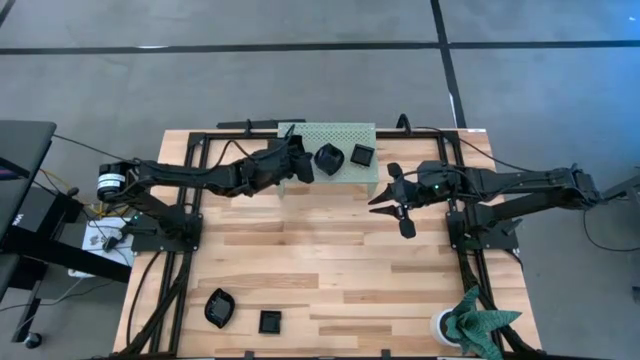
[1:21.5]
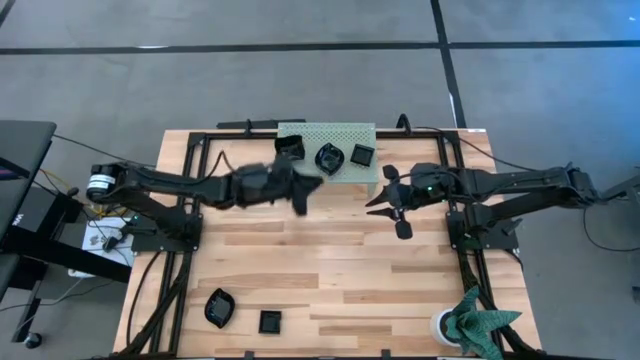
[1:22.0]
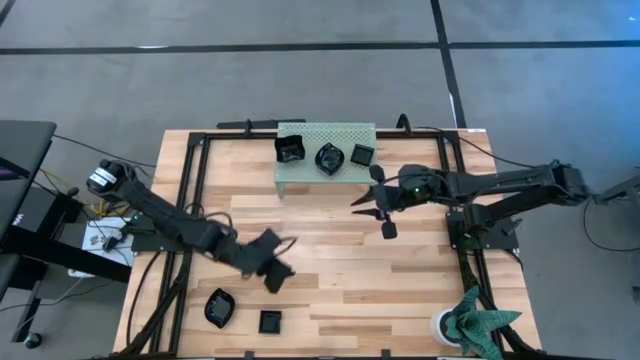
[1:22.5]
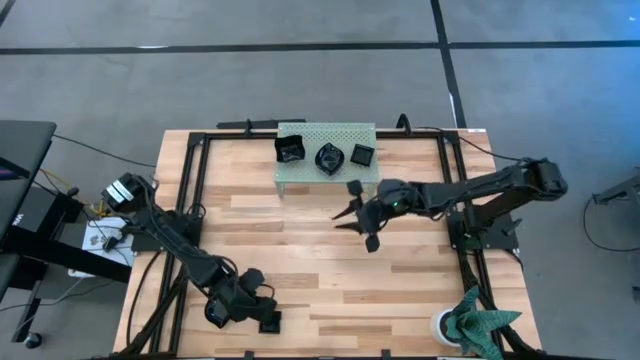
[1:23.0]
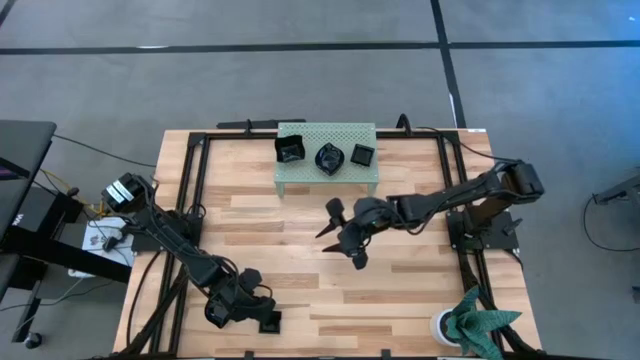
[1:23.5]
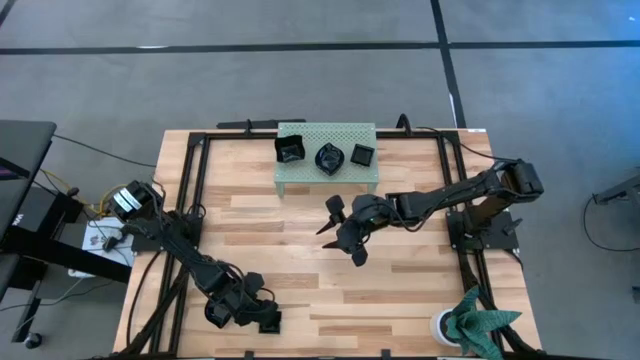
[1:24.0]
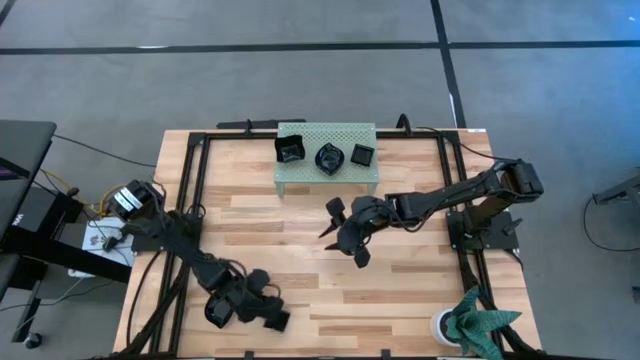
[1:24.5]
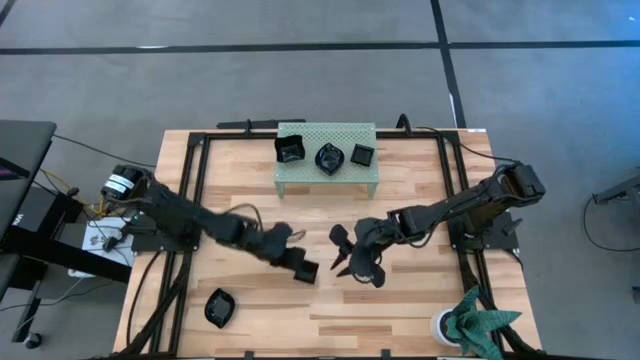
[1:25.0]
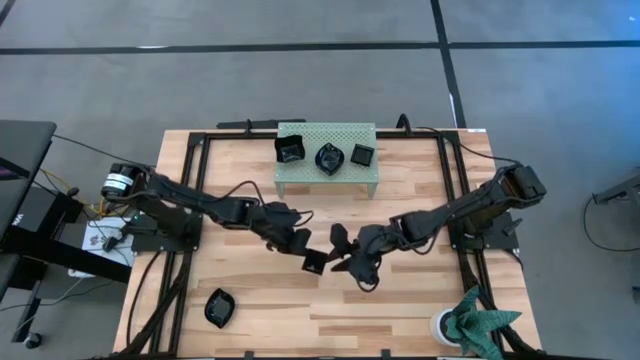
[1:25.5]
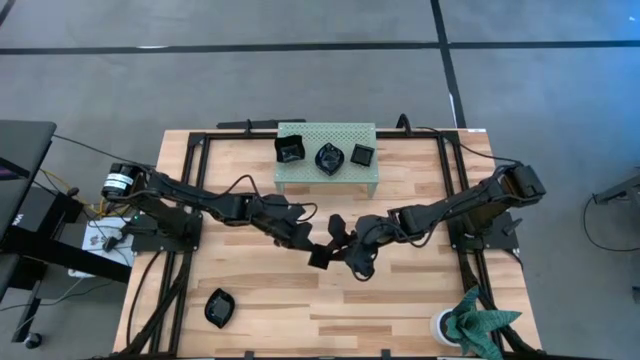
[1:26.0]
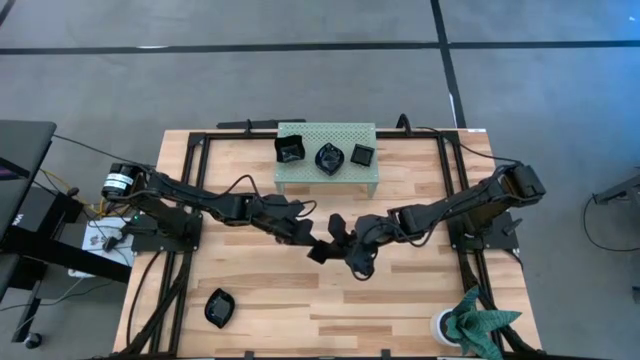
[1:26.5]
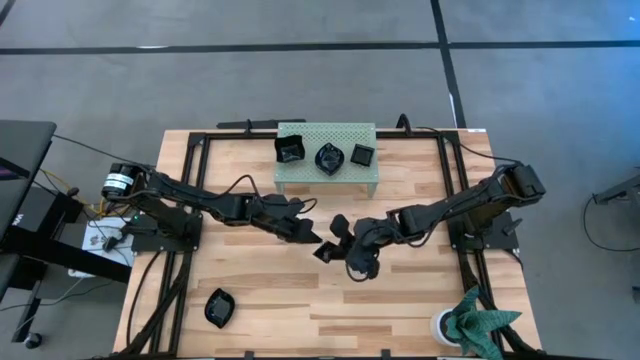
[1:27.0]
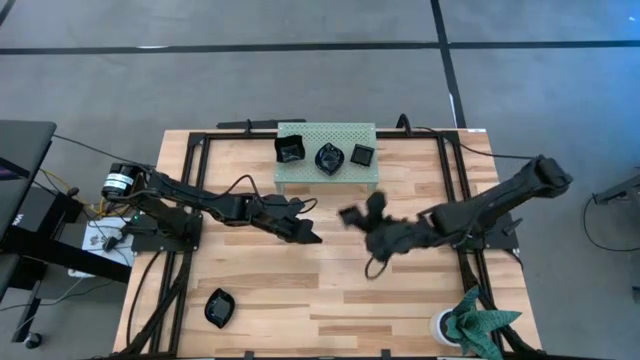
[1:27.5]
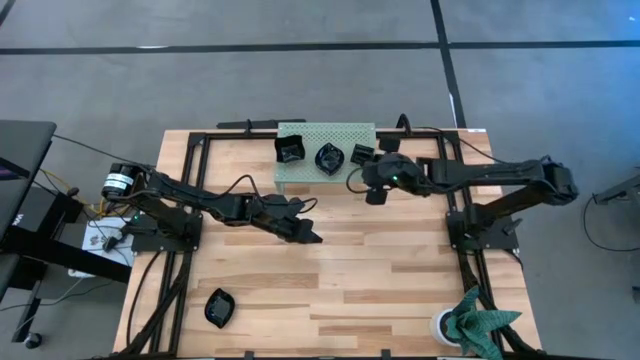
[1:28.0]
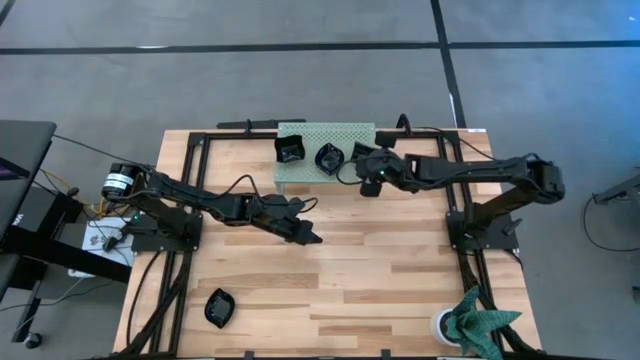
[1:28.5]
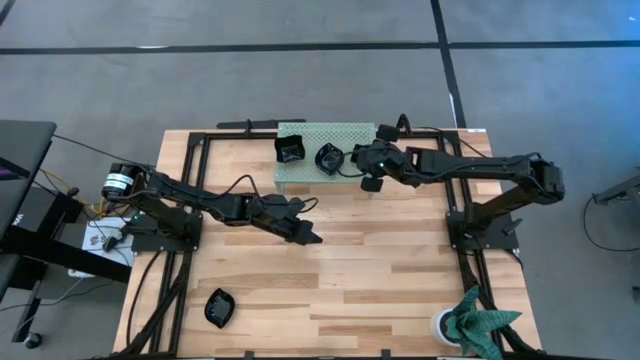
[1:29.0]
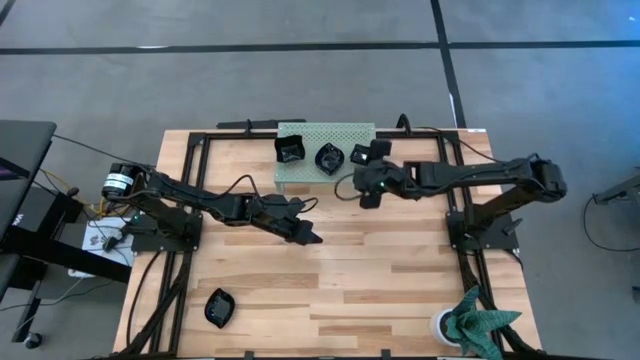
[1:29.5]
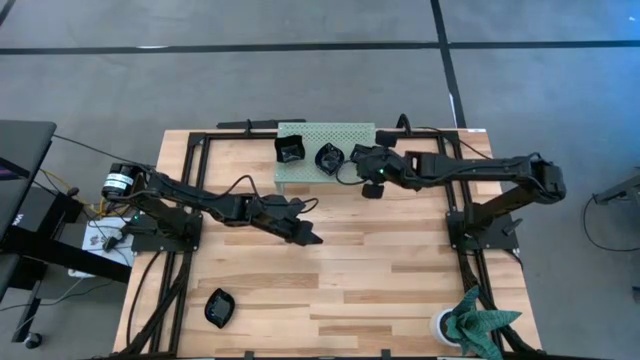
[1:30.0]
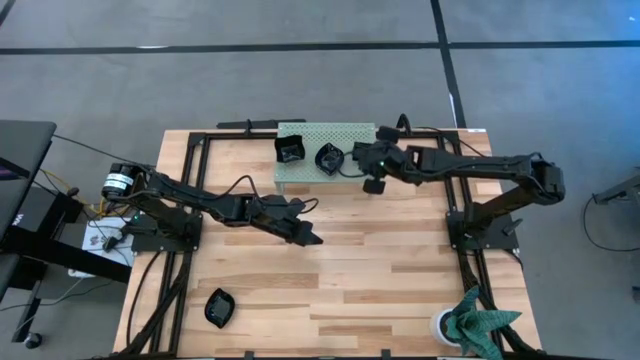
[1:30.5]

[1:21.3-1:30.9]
Task: Pick & Place Mini shaped plates
Stack the square plate on the square plate on the shelf

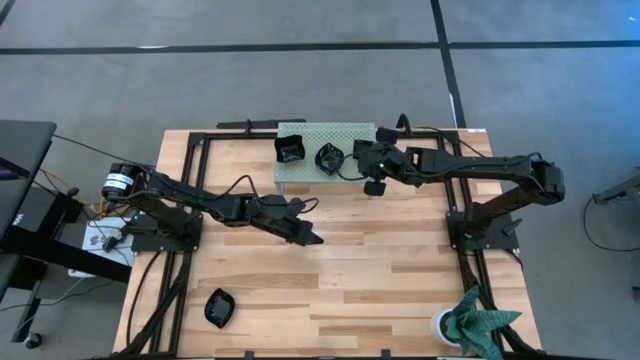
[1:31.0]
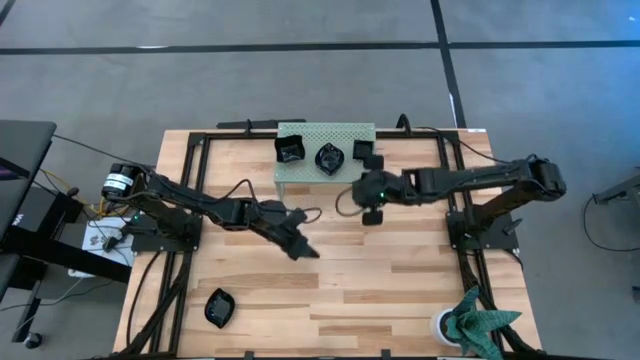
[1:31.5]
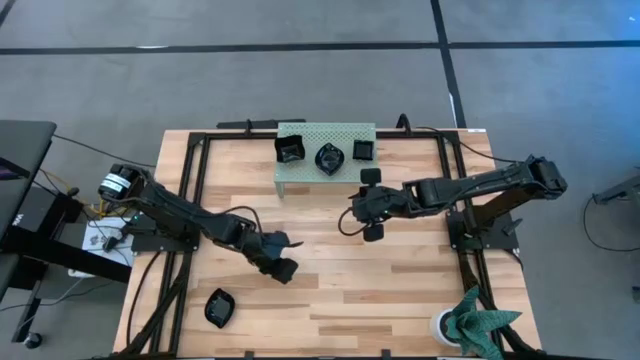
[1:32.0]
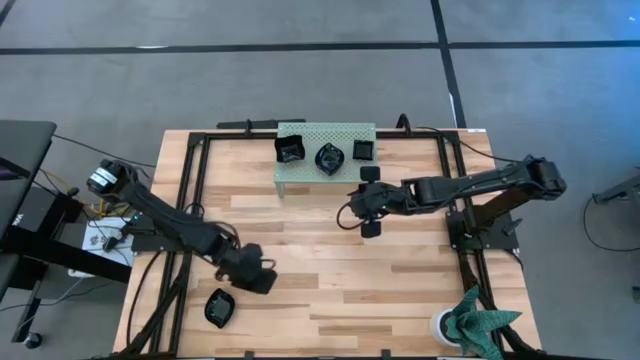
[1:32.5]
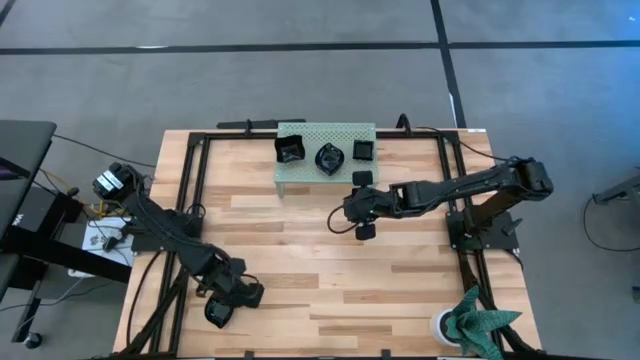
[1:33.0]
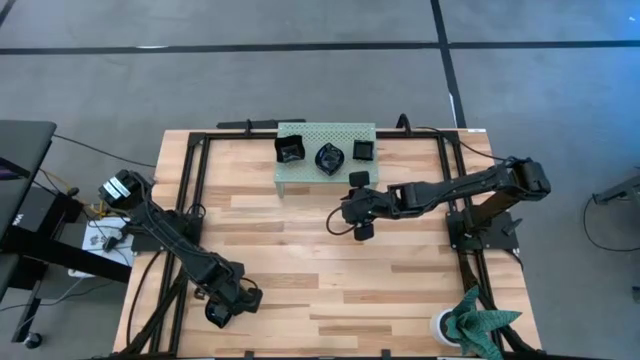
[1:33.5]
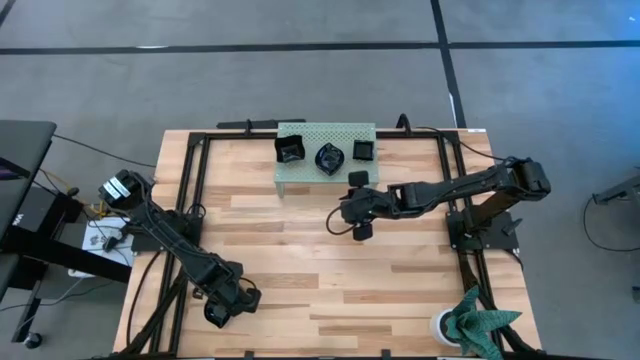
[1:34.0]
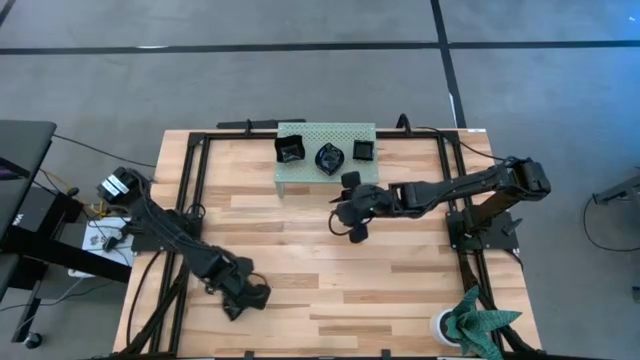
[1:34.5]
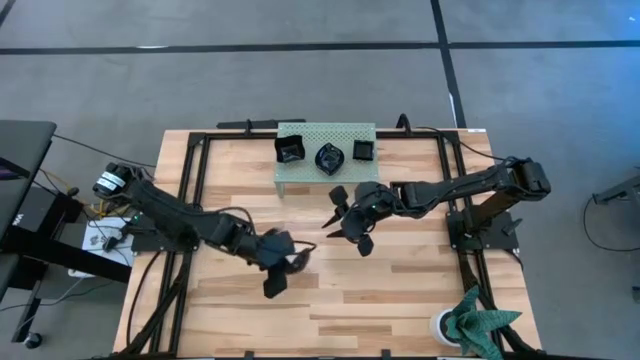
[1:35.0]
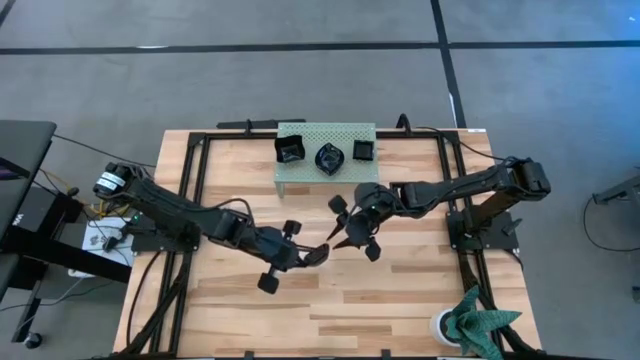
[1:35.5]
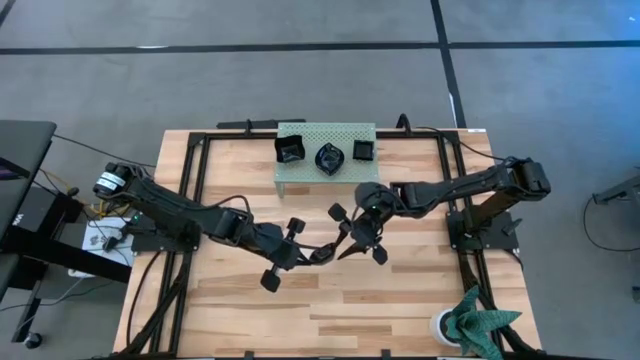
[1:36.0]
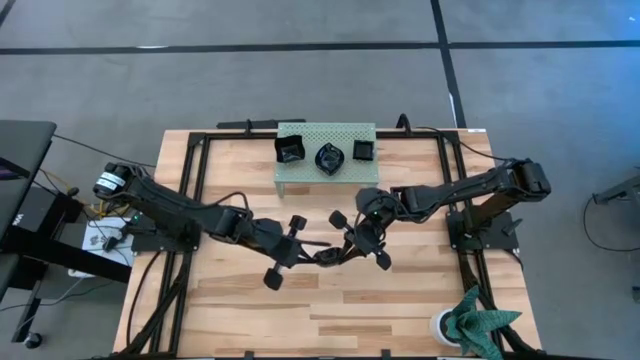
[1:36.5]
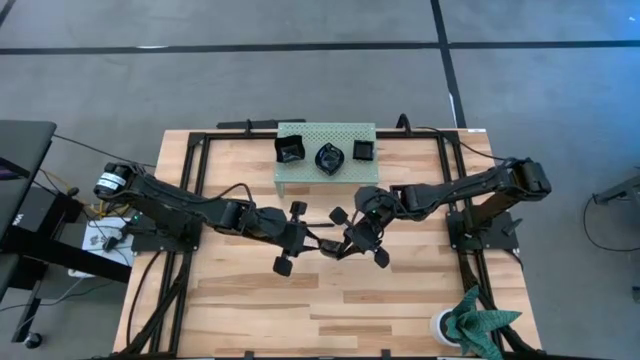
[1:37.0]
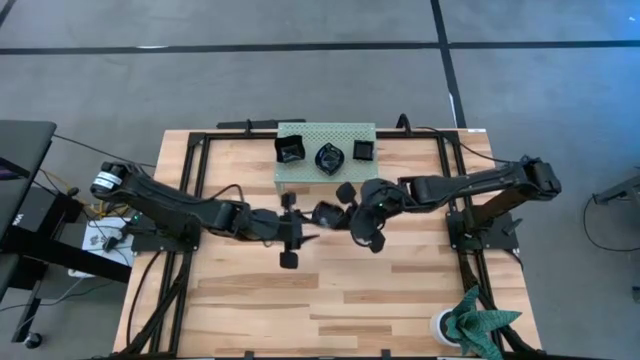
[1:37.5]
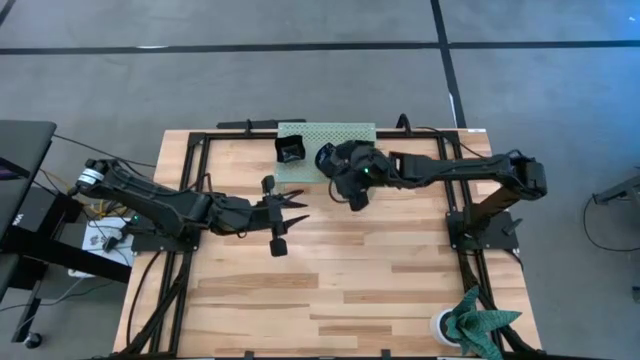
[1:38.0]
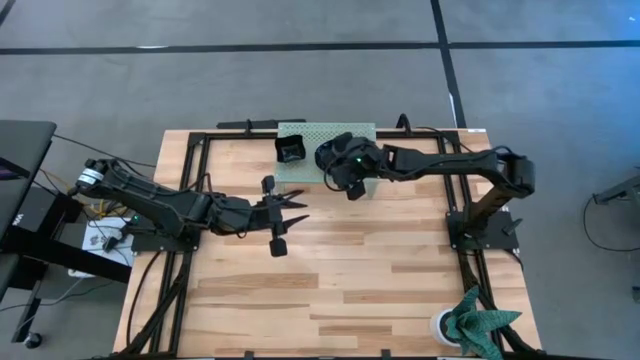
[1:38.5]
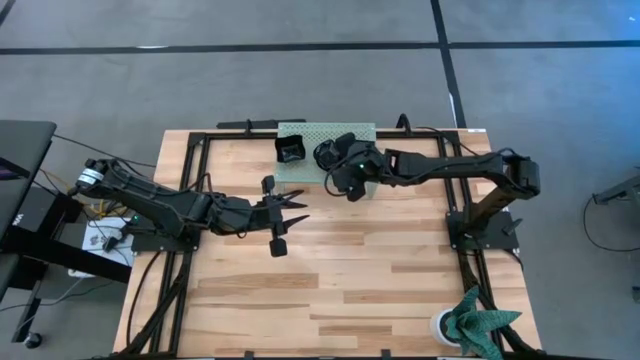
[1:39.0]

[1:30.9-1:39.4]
Stack the leaf-shaped plate on the leaf-shaped plate on the shelf

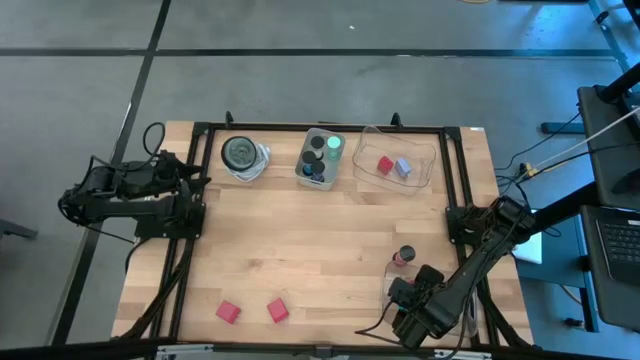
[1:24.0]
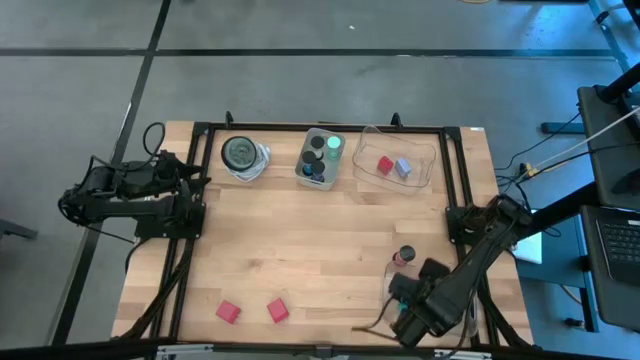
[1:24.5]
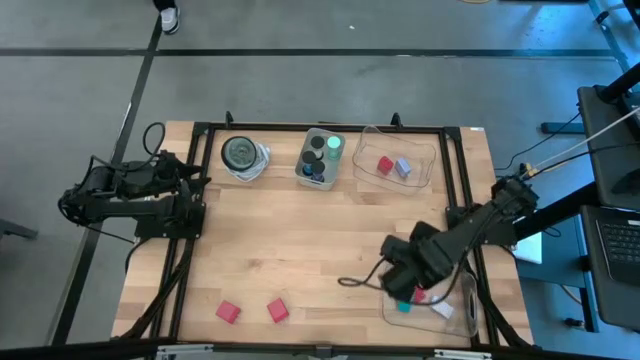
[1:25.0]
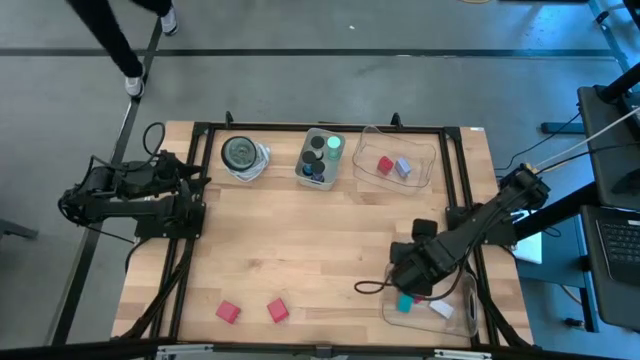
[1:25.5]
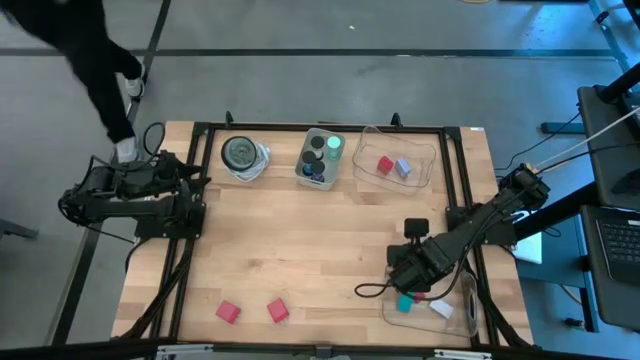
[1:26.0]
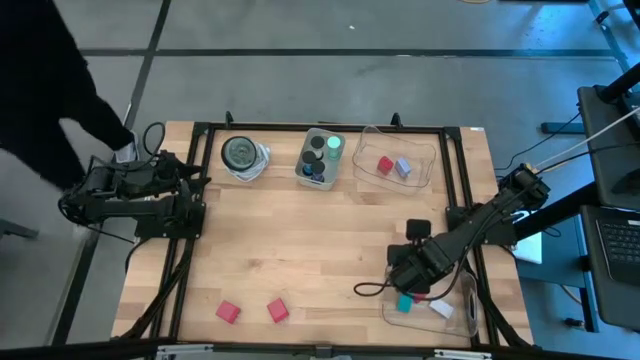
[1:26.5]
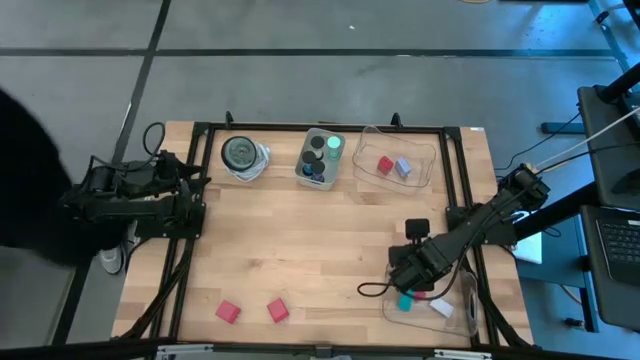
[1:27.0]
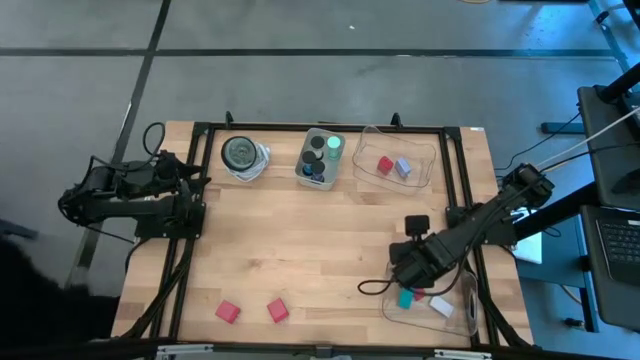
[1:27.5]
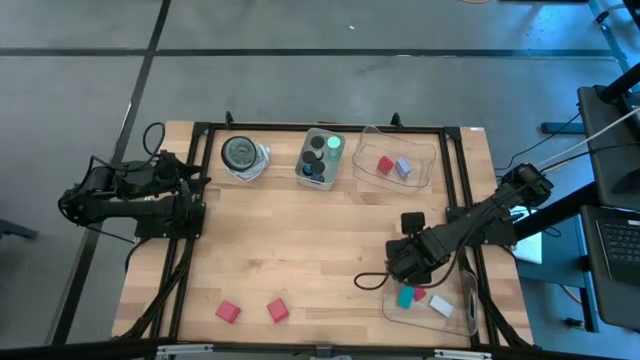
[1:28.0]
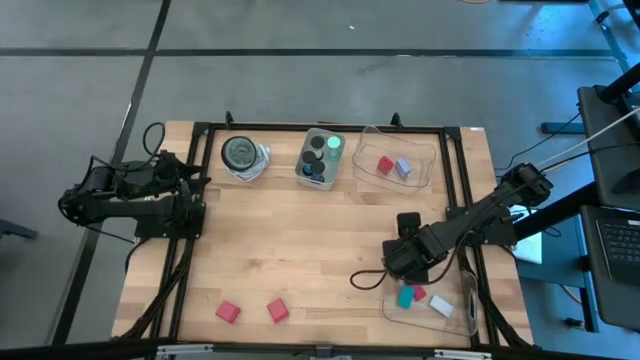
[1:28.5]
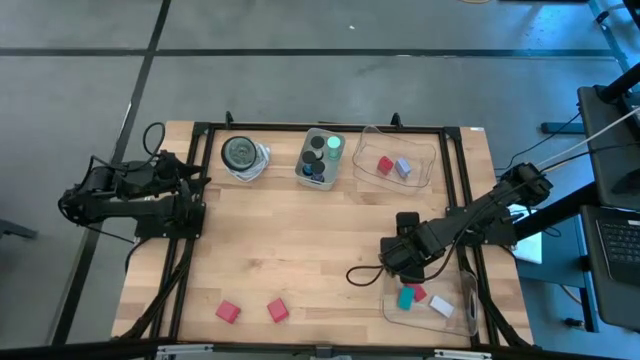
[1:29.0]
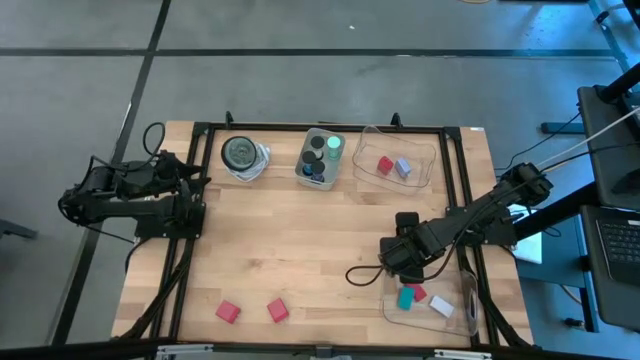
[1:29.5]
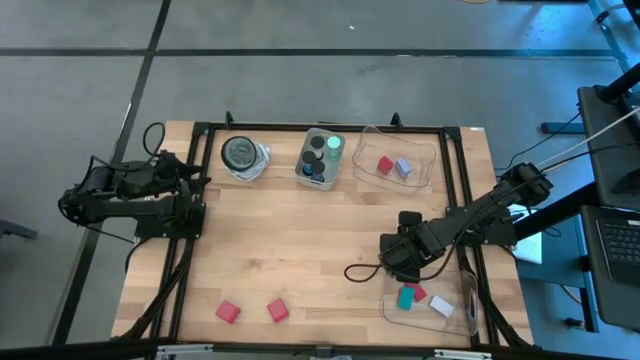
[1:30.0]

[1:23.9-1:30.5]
Task: Pick & Place Office items
Put the red hourglass into the gray bin
